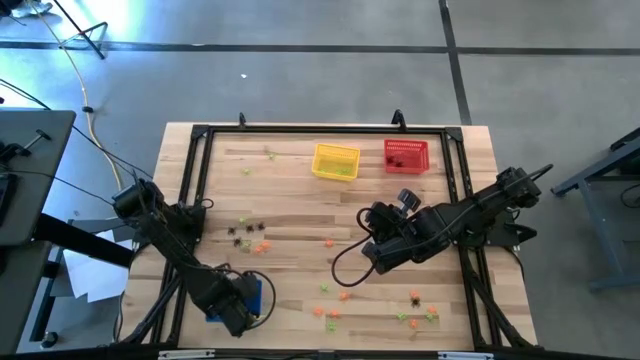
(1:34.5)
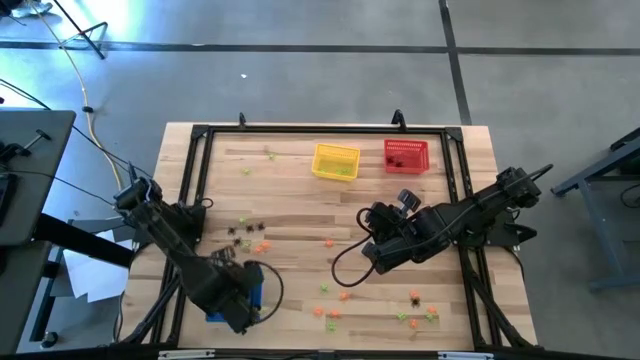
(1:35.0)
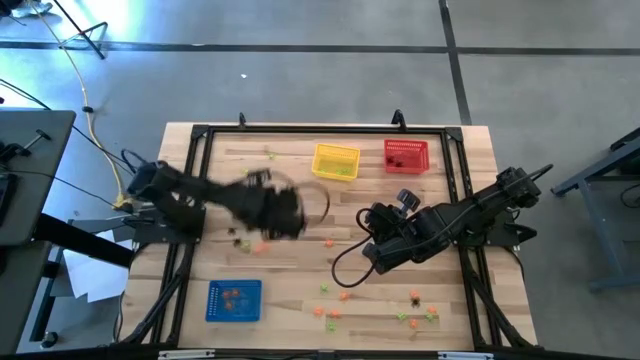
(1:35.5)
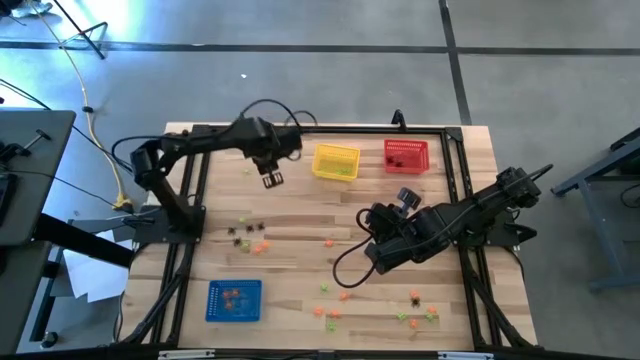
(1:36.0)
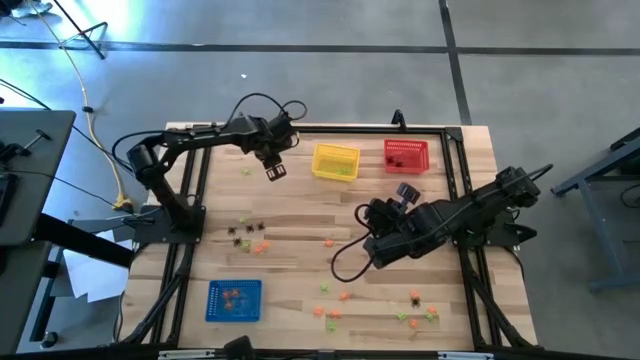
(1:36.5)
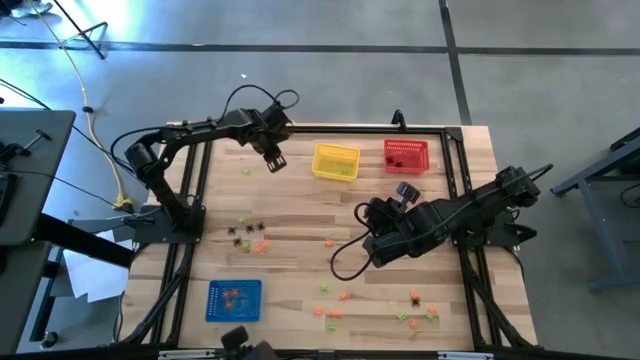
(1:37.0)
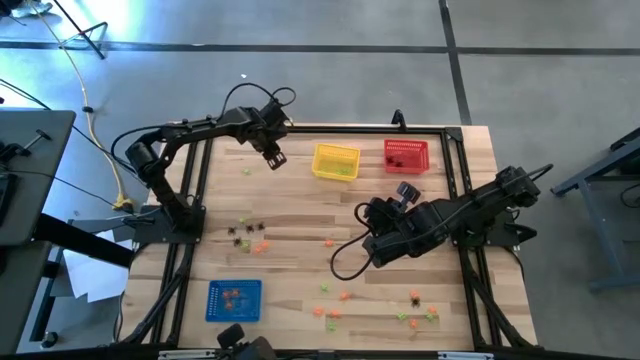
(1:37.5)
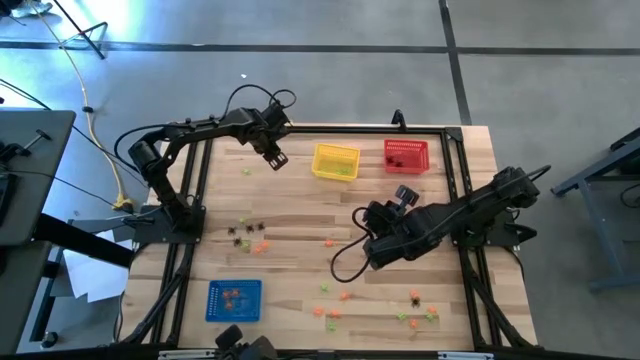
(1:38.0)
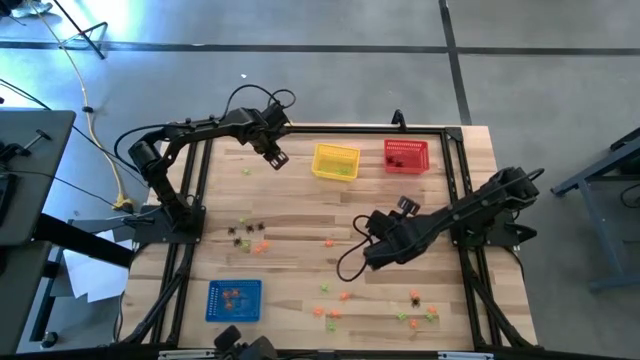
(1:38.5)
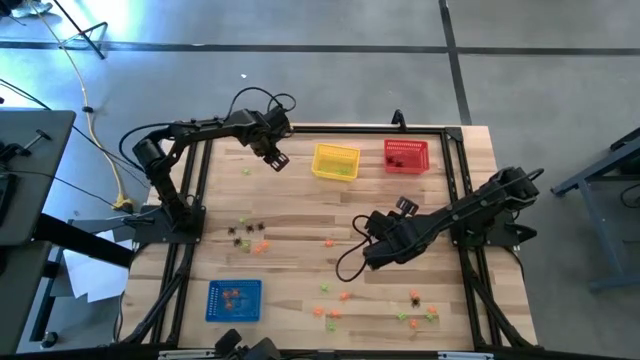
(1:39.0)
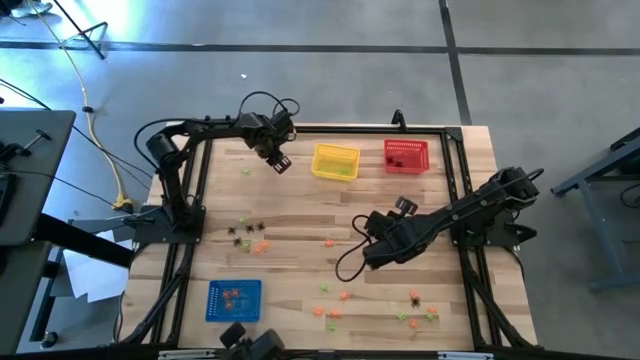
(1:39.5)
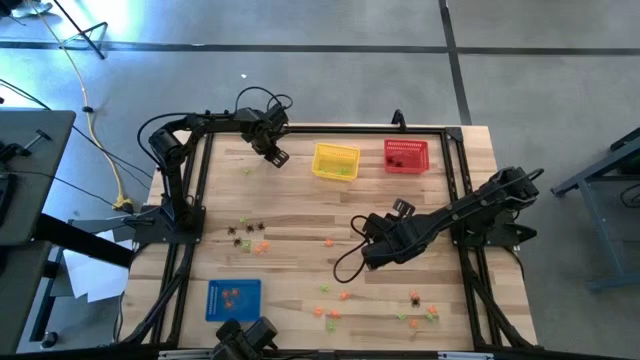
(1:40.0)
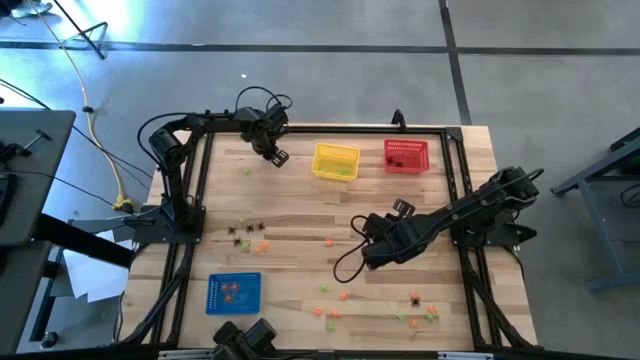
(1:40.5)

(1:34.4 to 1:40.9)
Task: Sort Halloween decoration
Put the green spider toy into the yellow bin

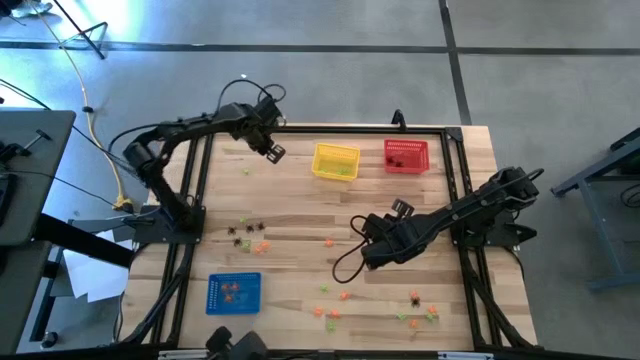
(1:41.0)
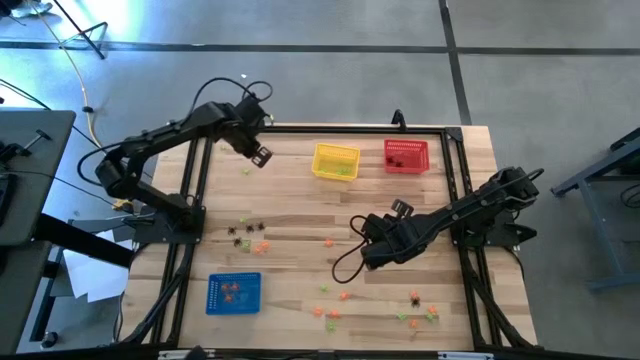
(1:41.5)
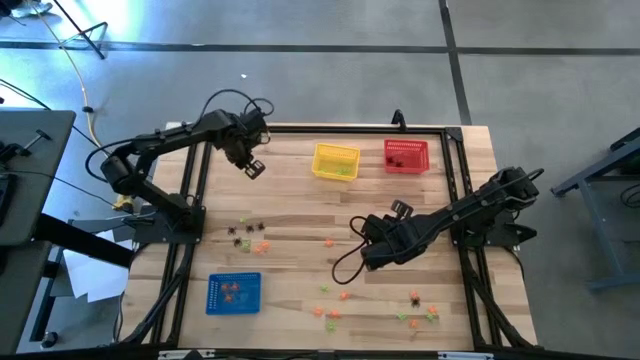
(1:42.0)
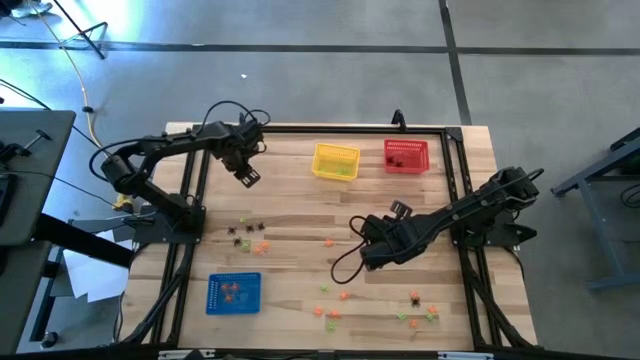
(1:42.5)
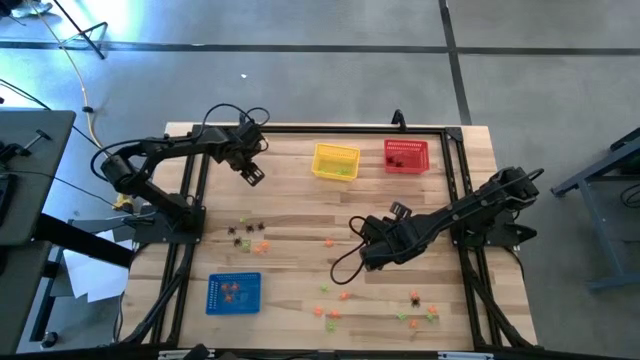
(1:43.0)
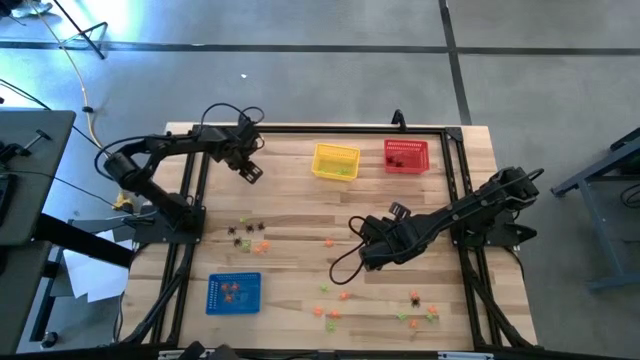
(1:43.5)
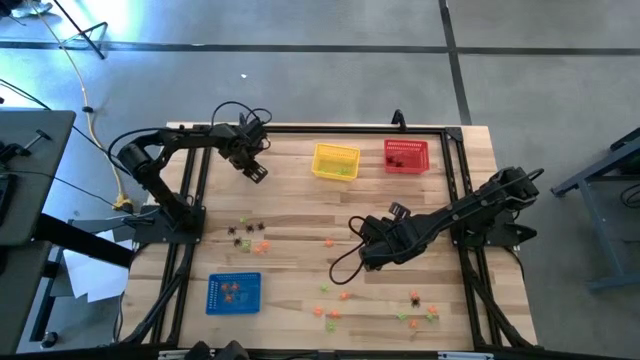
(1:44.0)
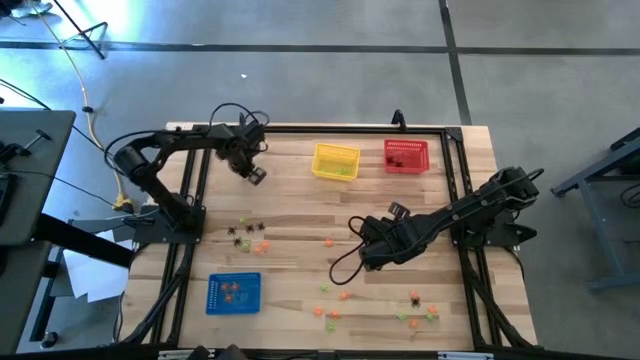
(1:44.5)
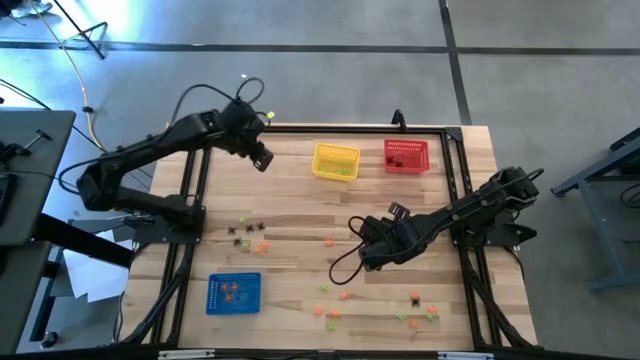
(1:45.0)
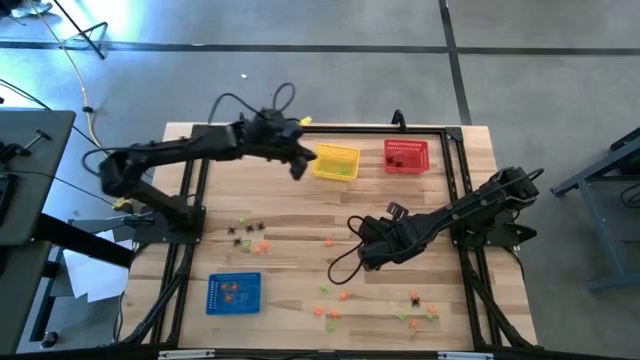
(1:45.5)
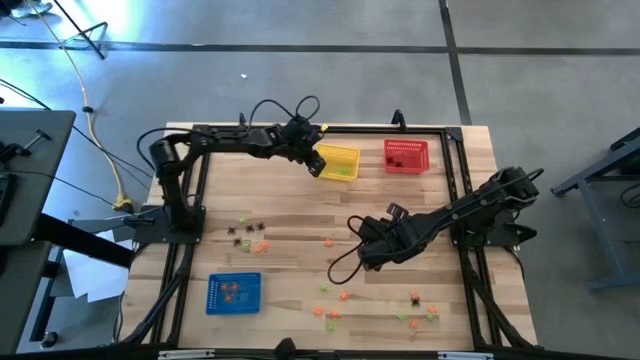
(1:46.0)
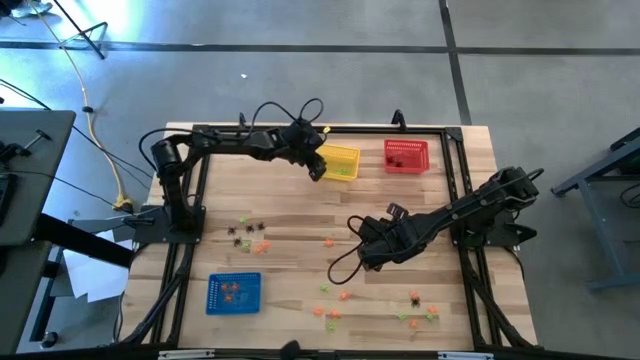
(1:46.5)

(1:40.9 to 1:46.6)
Put the green spider toy into the yellow bin

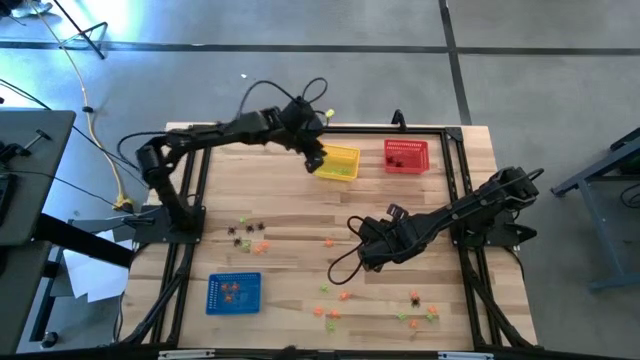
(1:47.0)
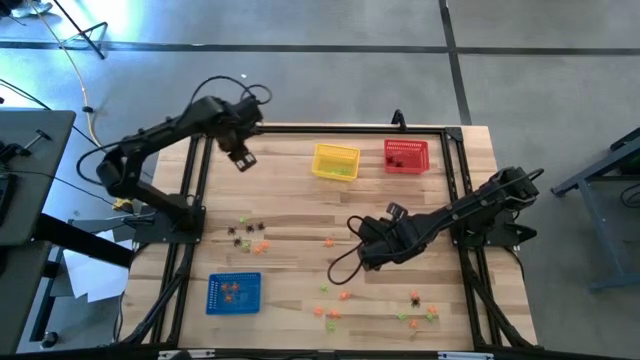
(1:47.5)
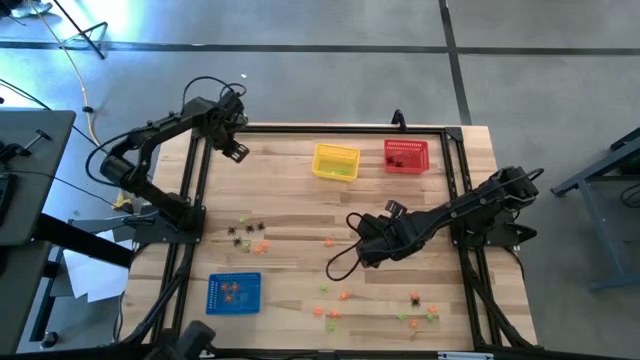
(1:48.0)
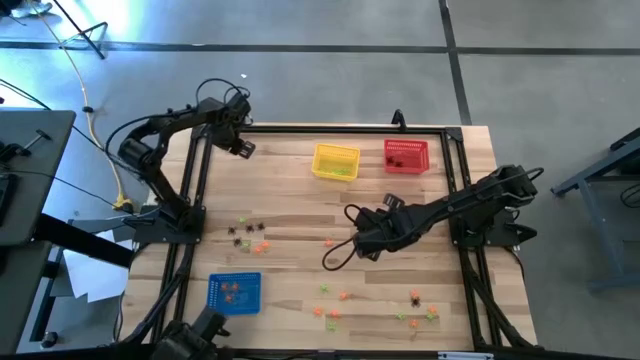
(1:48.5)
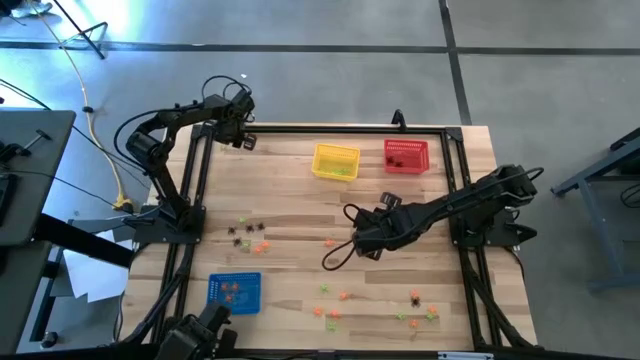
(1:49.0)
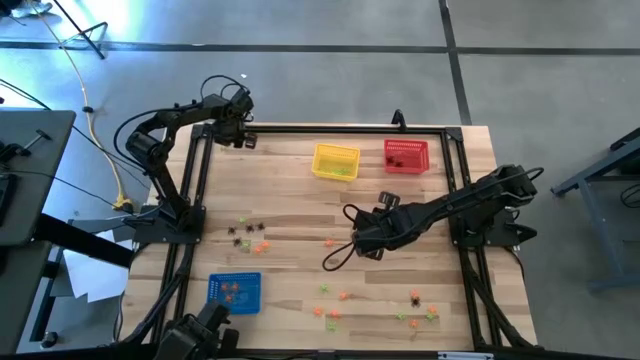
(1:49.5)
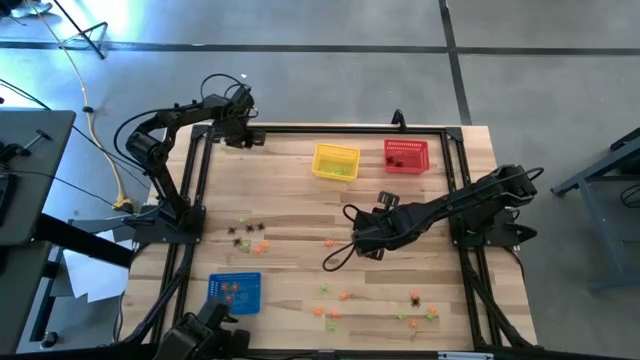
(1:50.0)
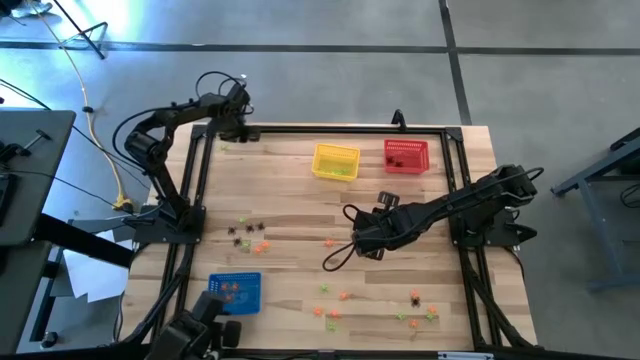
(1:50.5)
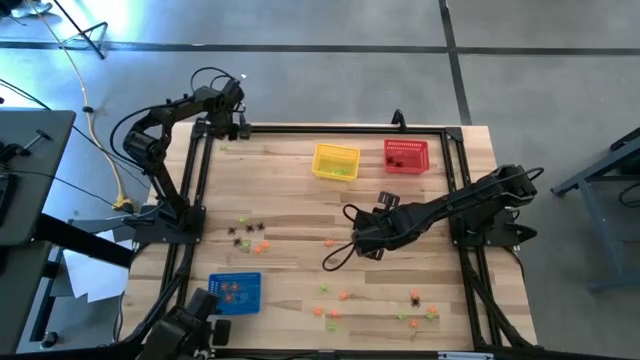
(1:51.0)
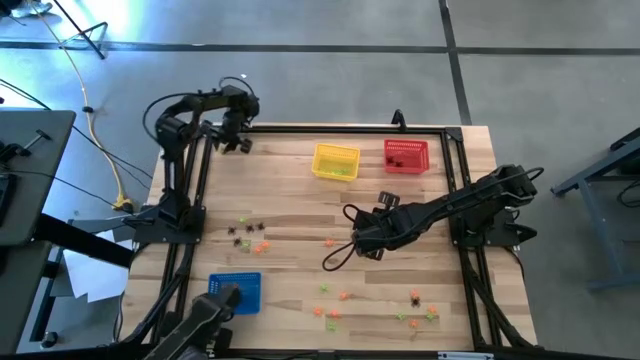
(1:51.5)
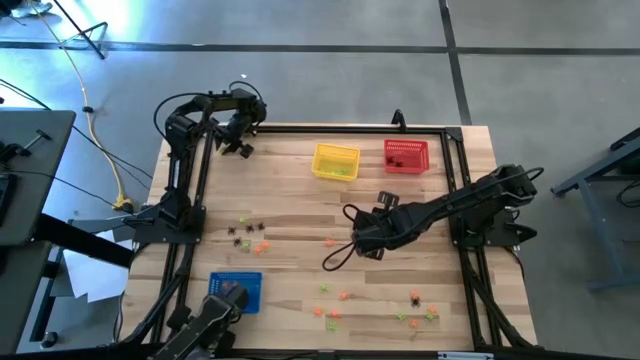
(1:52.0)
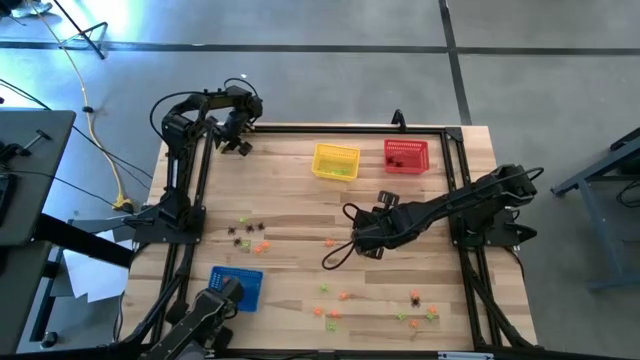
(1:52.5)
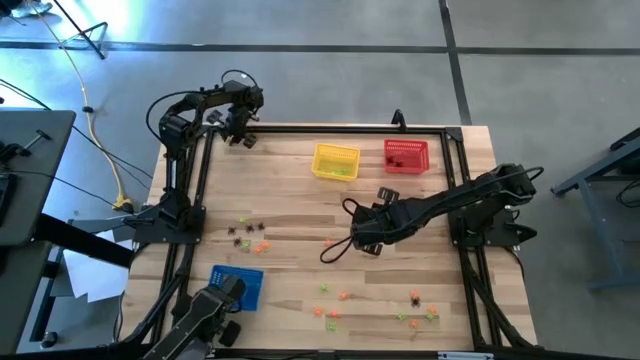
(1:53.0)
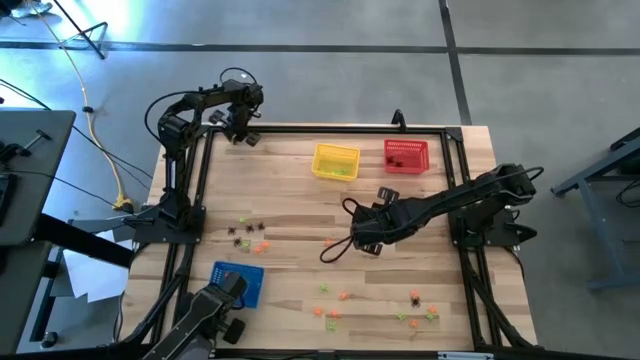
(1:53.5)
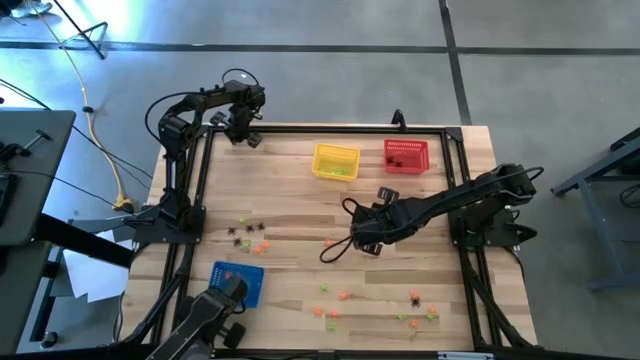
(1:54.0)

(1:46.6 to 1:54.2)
Put the green spider toy into the yellow bin
